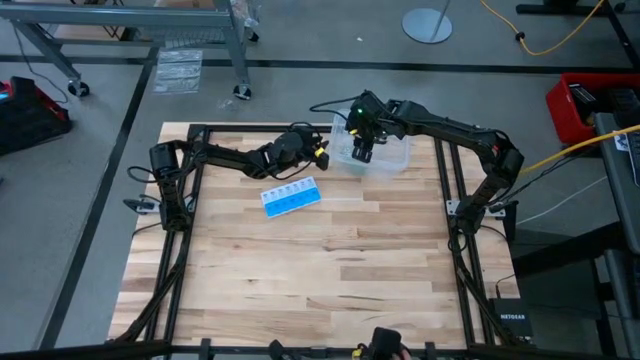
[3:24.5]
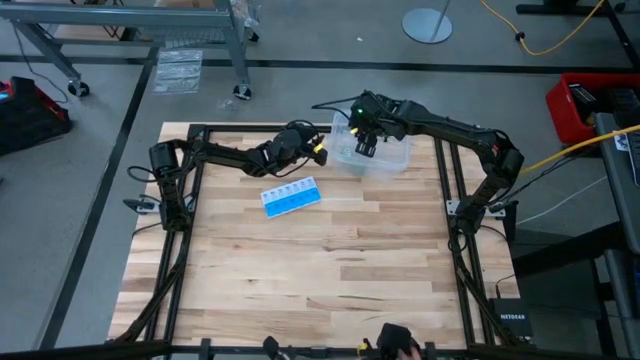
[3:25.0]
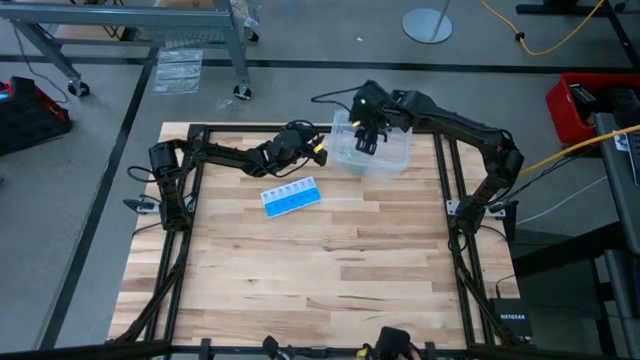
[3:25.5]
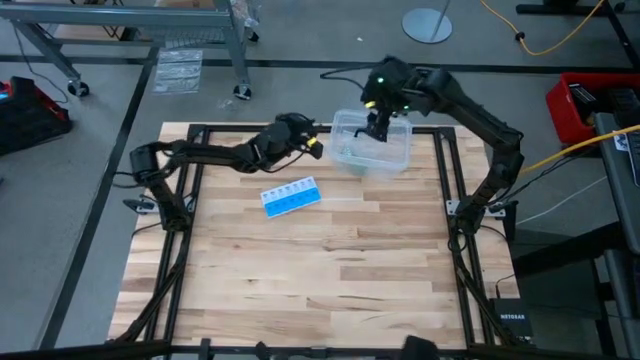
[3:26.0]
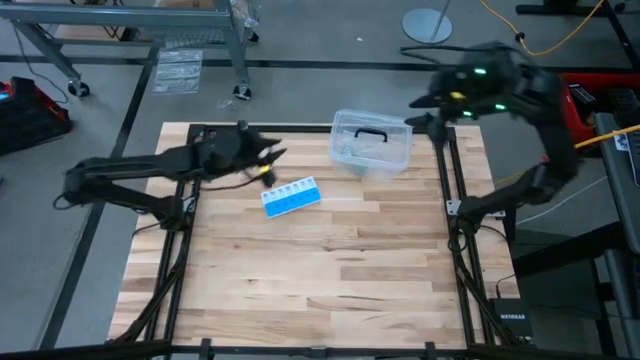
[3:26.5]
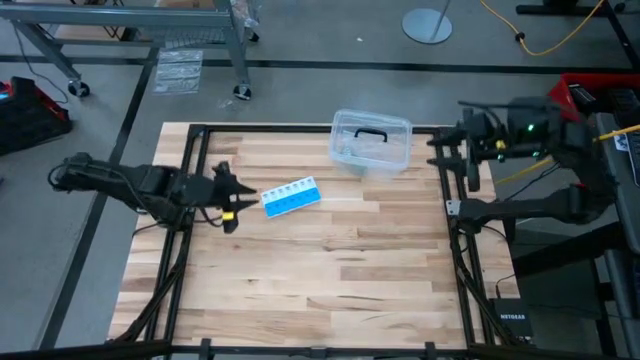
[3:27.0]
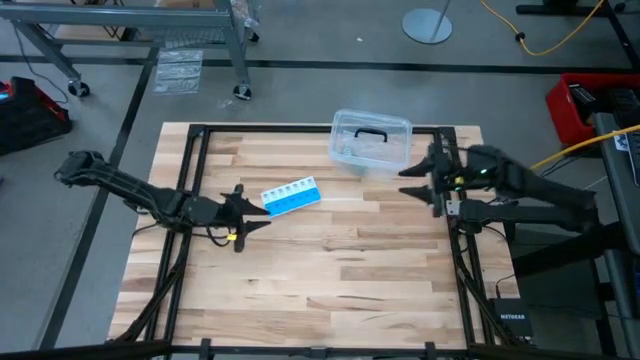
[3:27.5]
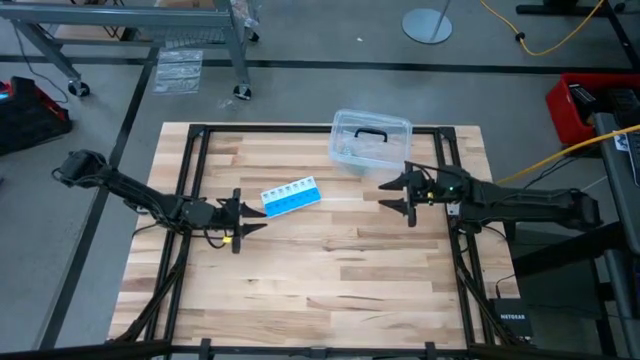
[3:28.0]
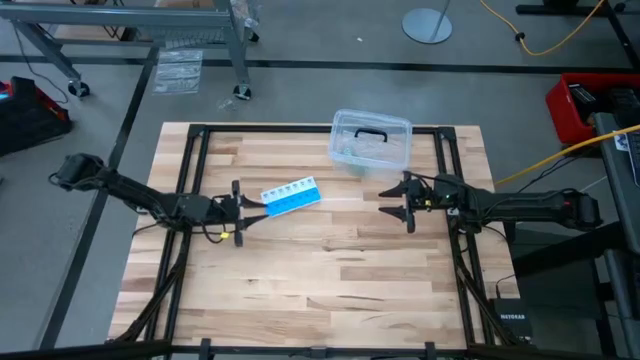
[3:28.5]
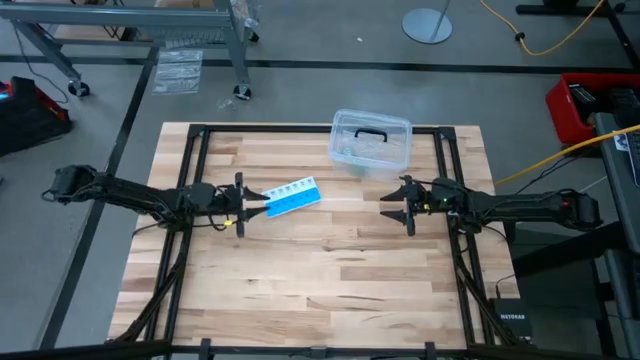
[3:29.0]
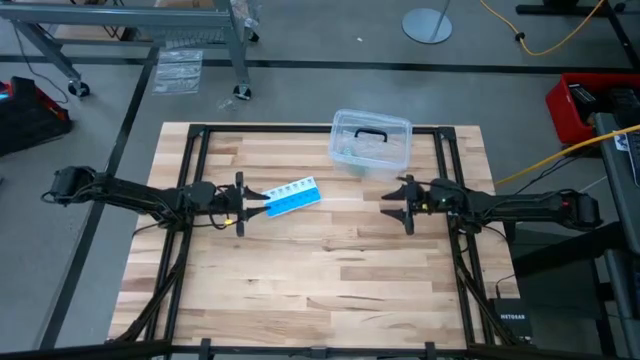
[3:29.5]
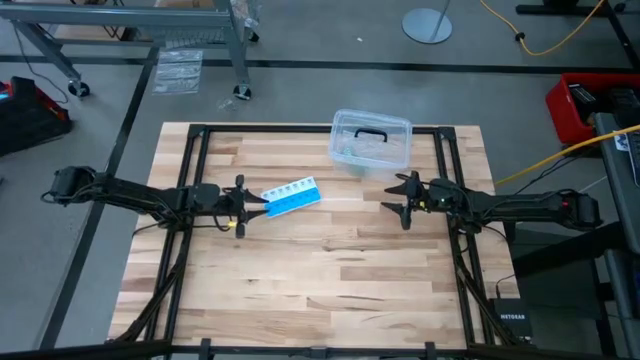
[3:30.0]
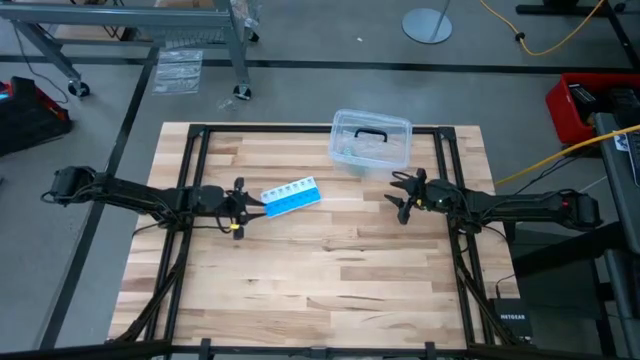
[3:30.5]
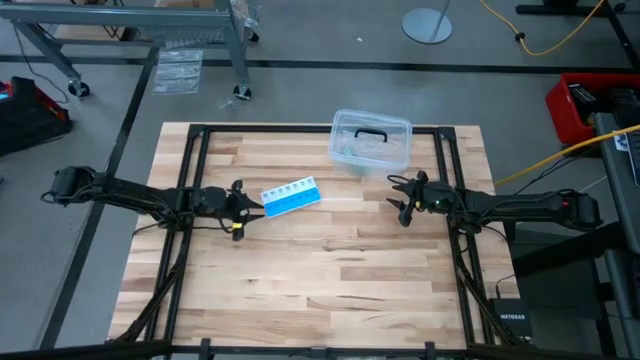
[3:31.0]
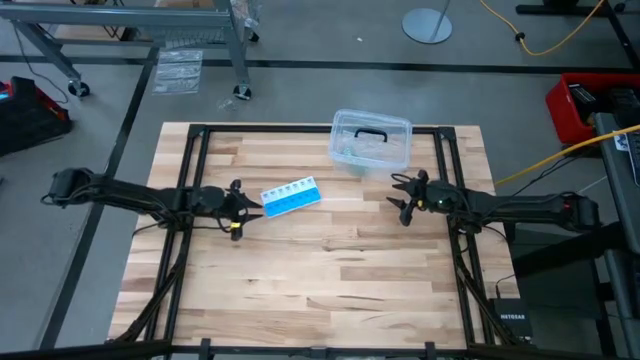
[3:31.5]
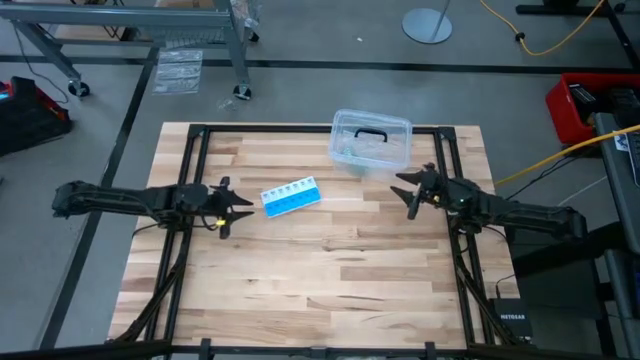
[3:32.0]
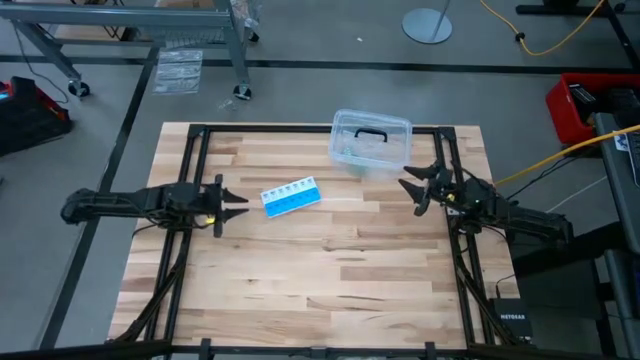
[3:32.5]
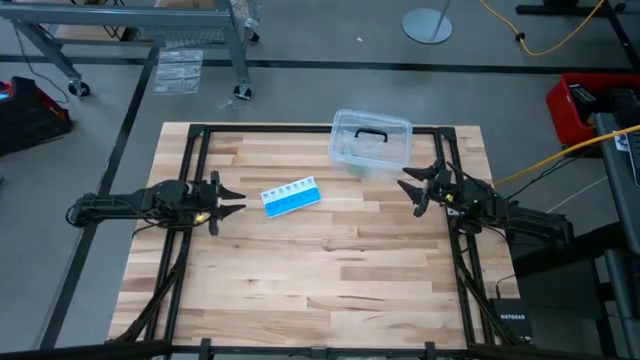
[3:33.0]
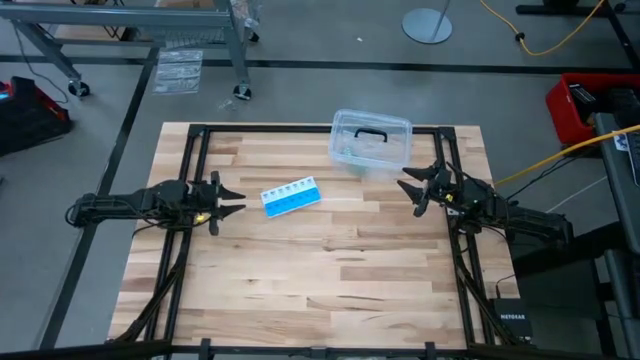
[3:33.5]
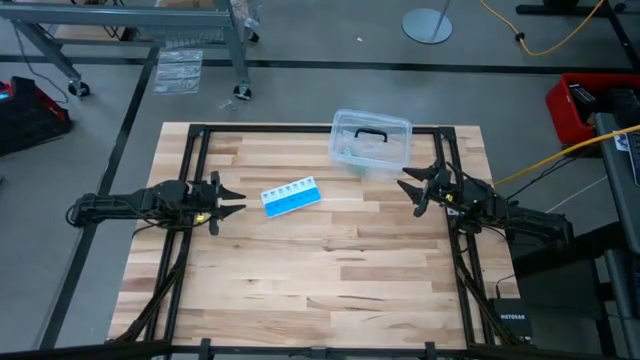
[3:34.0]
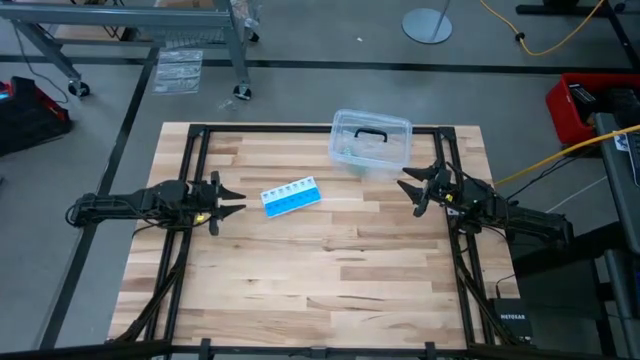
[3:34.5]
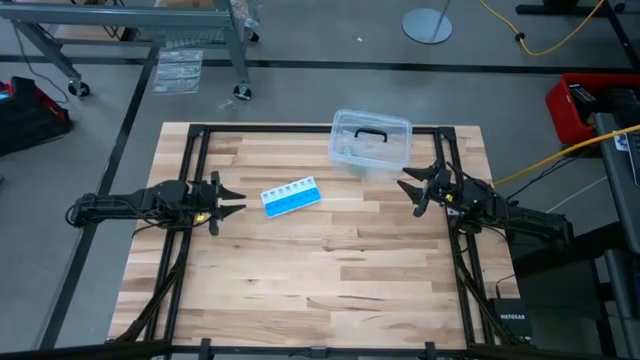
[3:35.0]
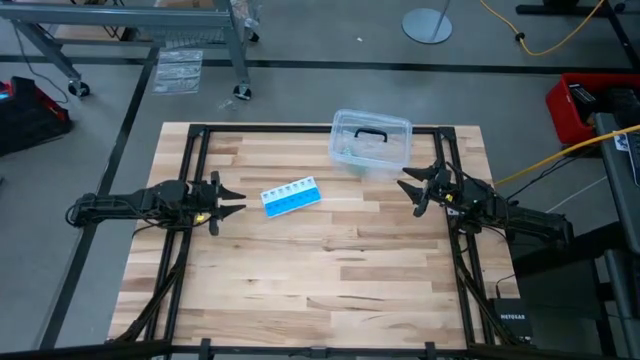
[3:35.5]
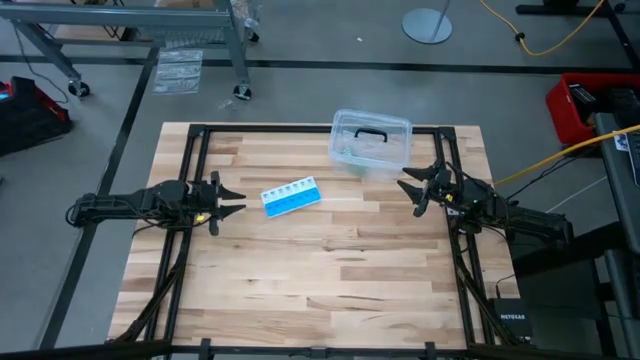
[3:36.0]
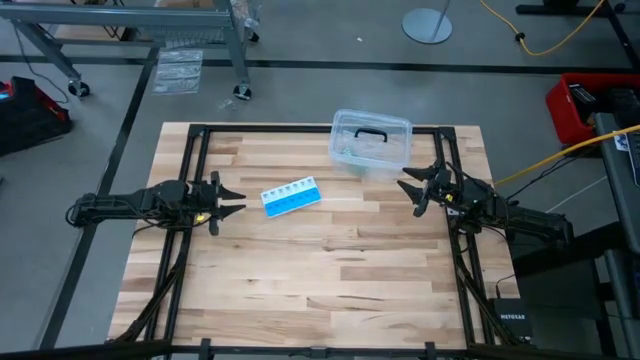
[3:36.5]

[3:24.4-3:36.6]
Task: Roll bandage
Return to Home Position

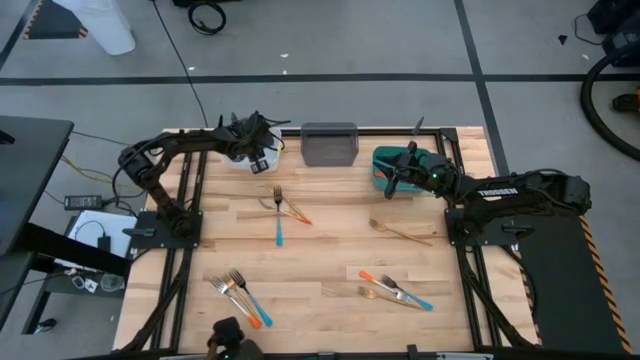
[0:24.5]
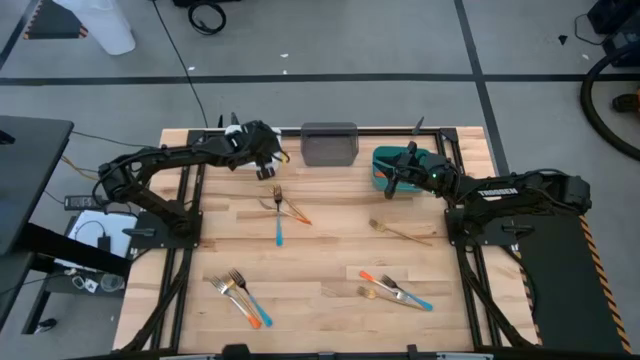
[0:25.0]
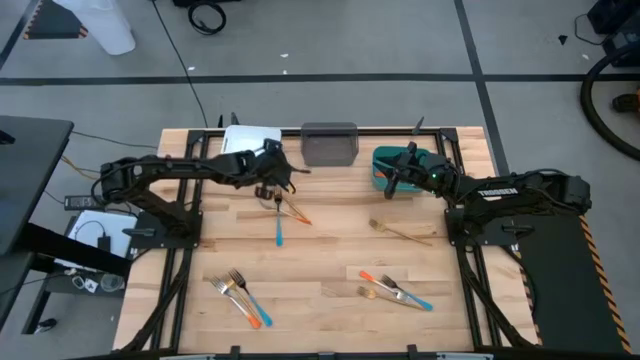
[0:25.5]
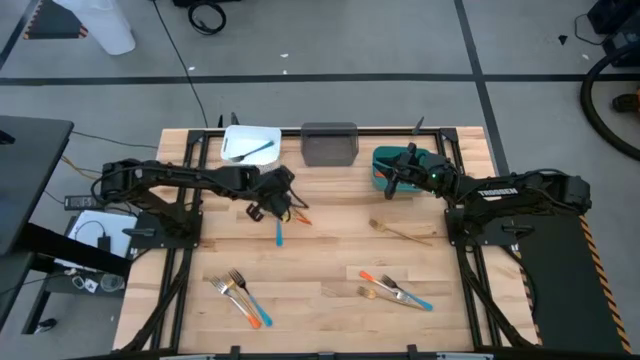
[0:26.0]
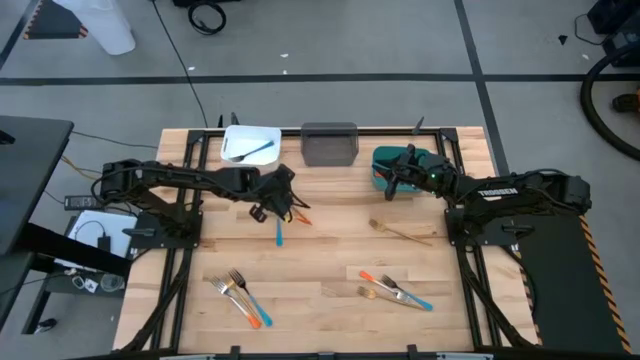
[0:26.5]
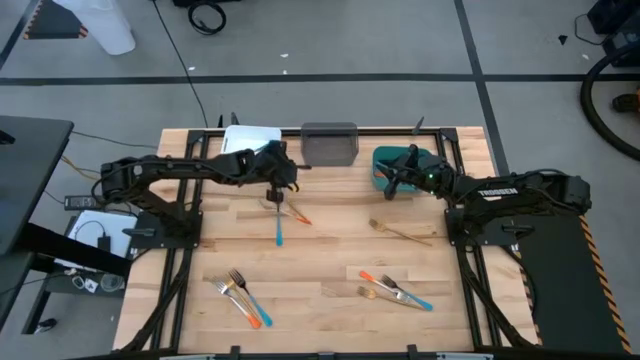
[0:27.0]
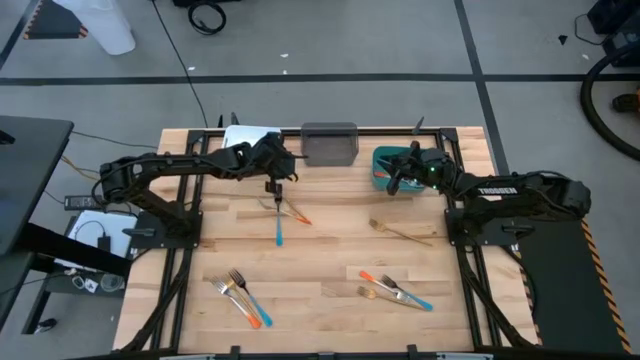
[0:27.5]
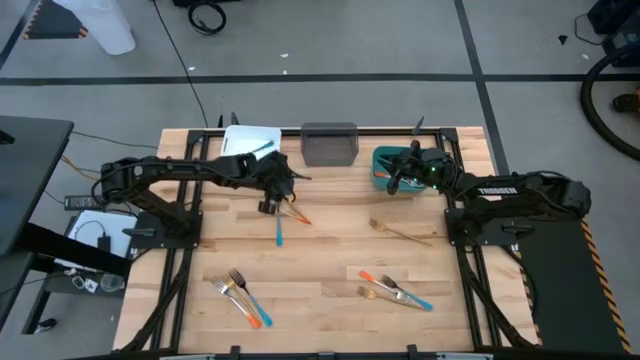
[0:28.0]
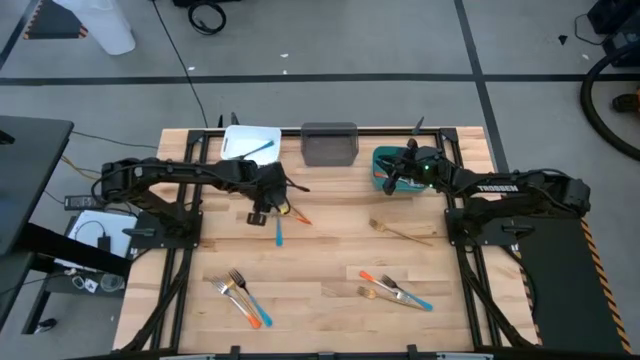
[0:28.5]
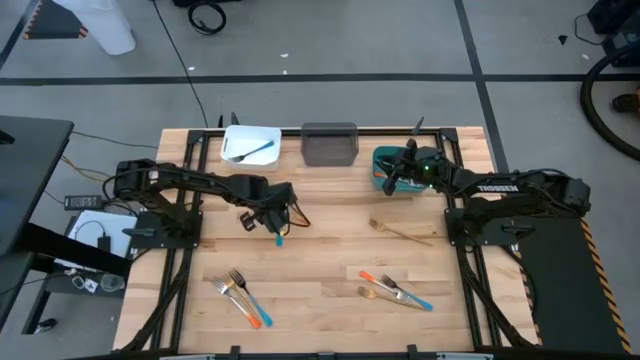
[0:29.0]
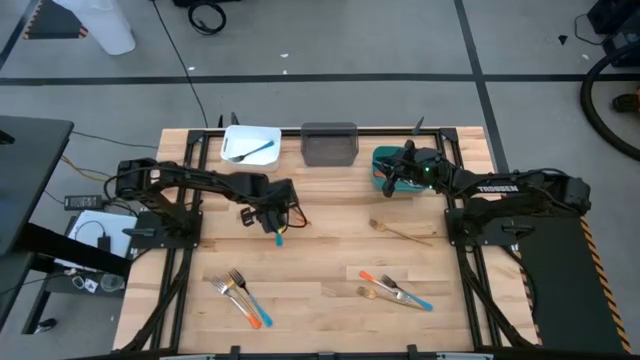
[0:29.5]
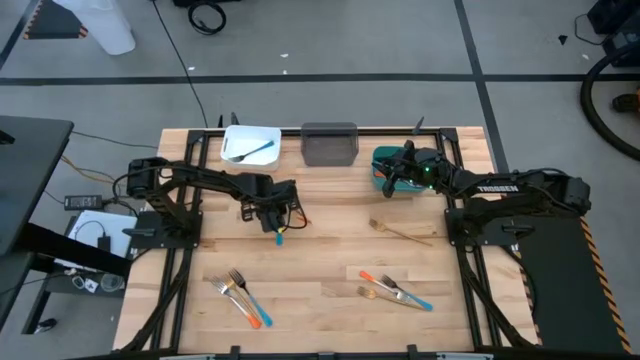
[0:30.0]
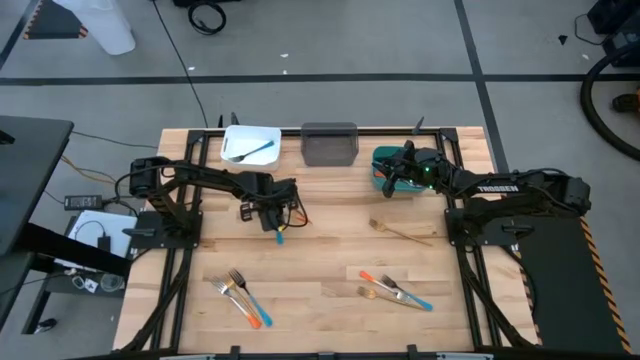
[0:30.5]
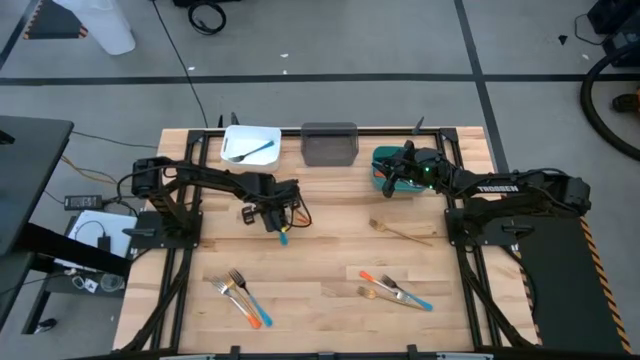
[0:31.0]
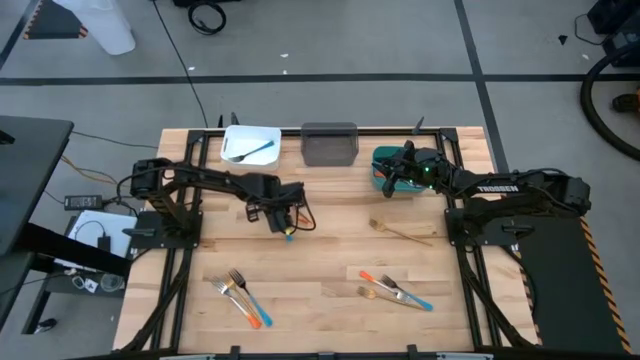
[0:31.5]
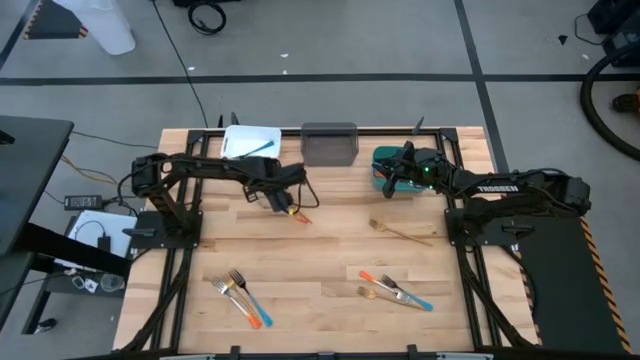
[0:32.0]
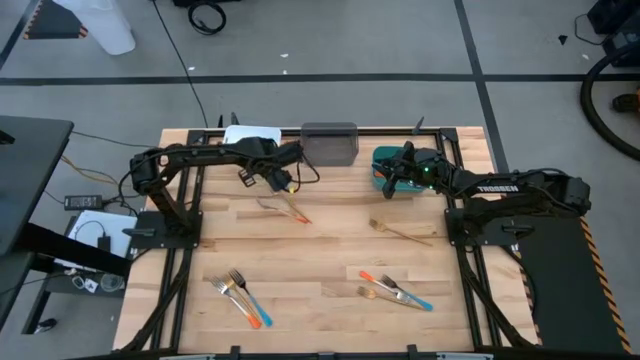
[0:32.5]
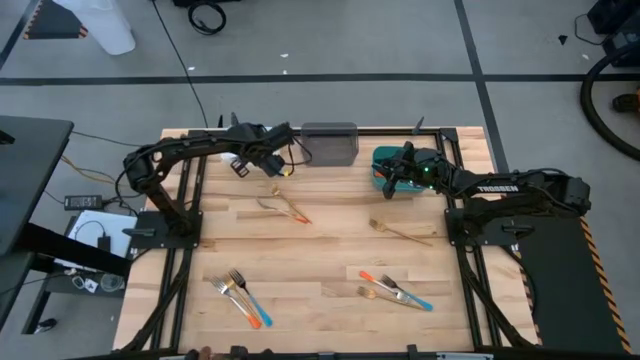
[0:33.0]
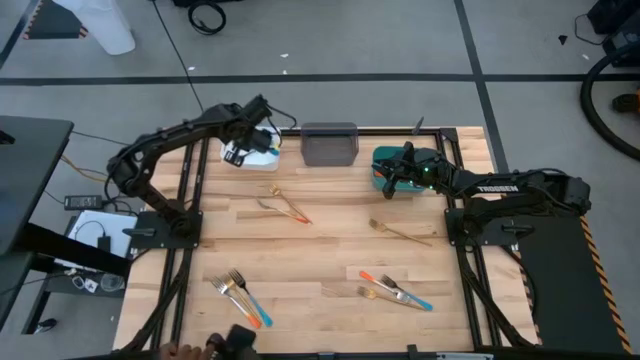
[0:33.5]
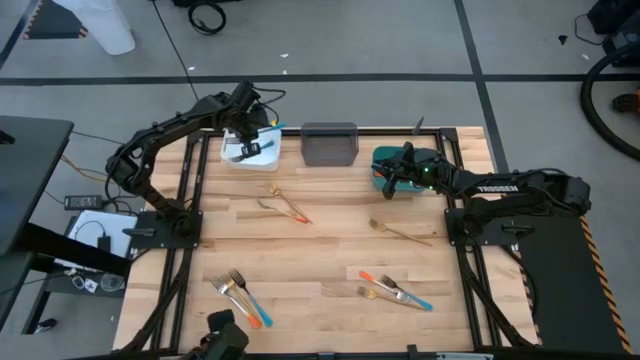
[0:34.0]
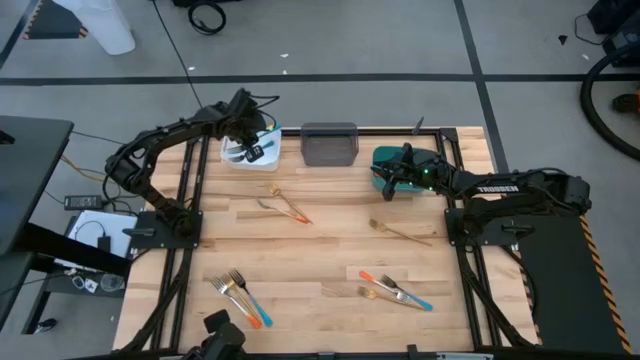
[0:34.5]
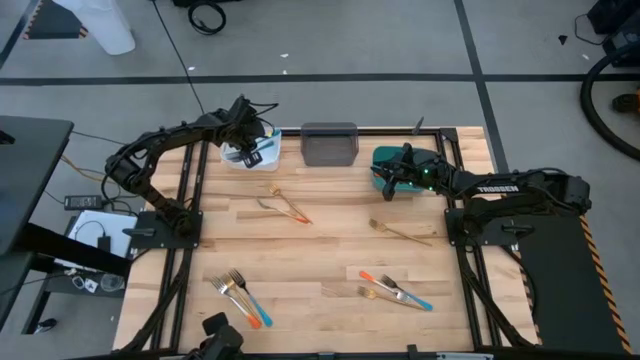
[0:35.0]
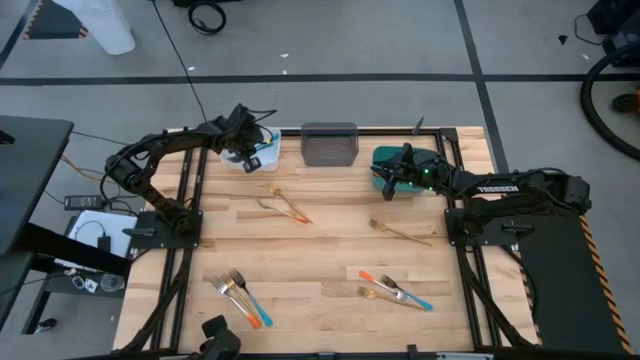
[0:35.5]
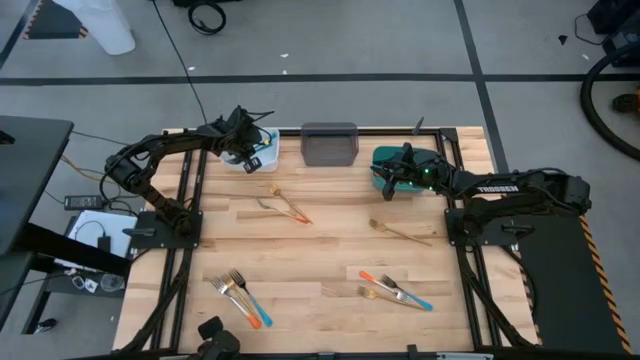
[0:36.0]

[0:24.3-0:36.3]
Task: Sort silverware by color (type)
Put the blue fork into the white bin
